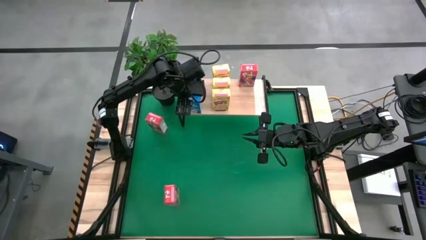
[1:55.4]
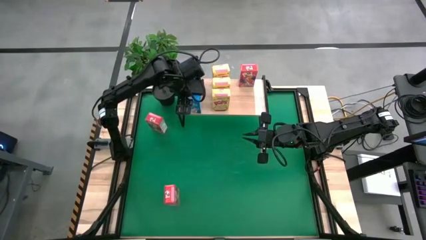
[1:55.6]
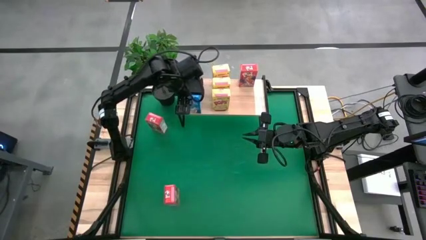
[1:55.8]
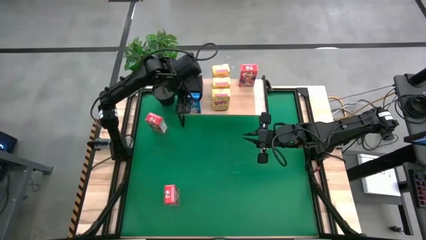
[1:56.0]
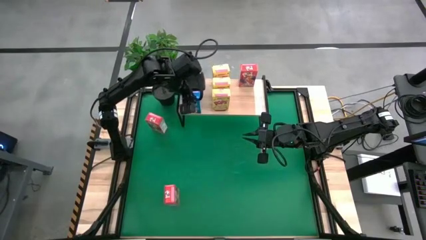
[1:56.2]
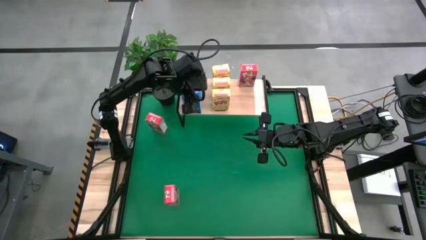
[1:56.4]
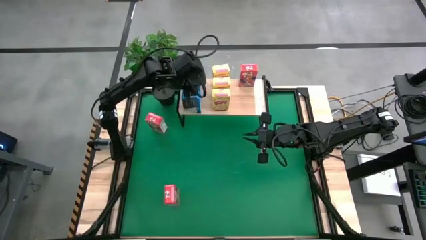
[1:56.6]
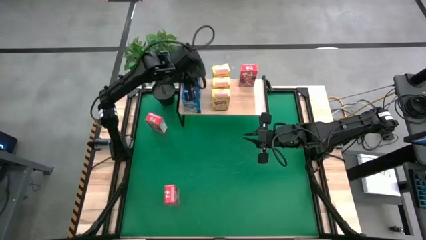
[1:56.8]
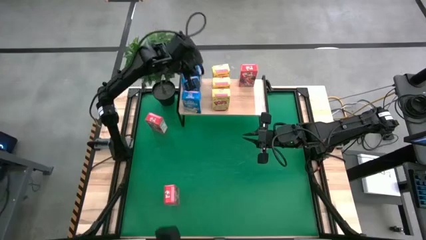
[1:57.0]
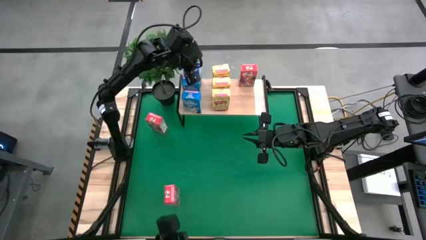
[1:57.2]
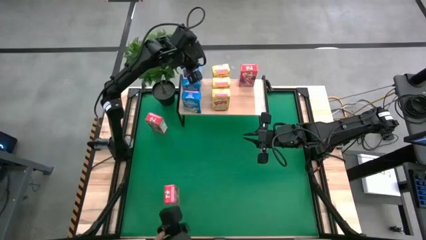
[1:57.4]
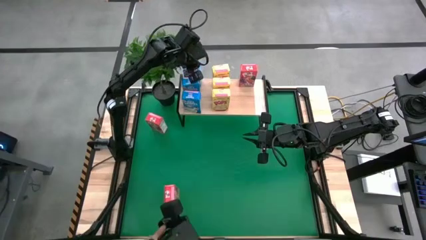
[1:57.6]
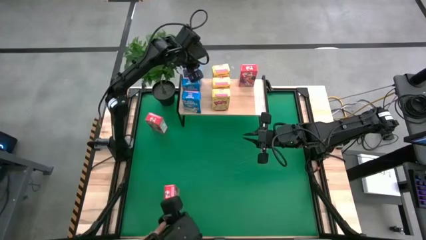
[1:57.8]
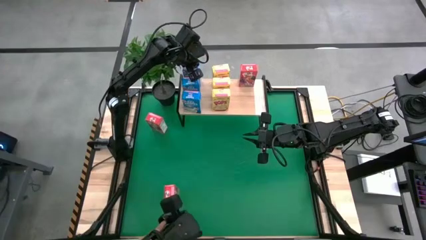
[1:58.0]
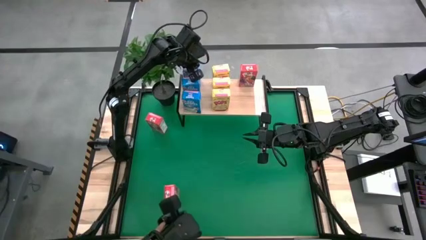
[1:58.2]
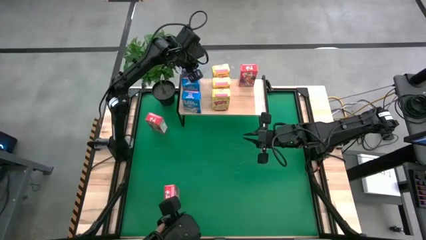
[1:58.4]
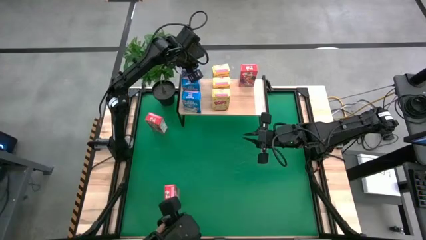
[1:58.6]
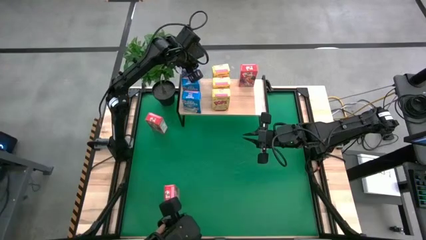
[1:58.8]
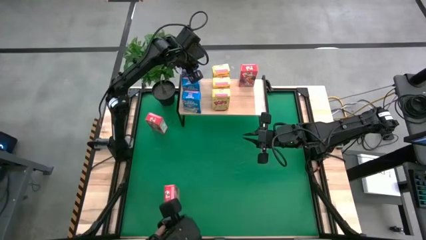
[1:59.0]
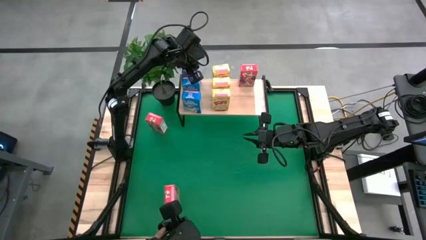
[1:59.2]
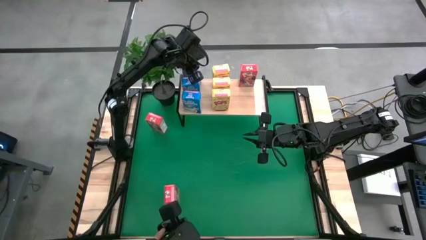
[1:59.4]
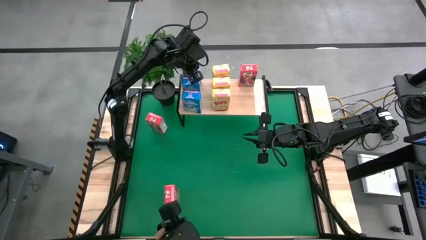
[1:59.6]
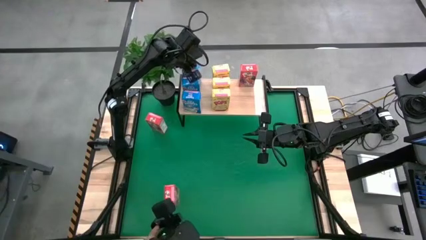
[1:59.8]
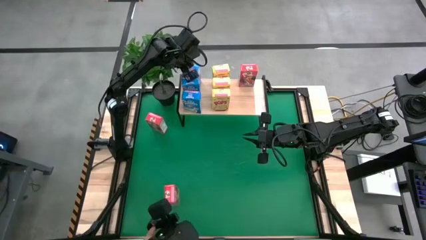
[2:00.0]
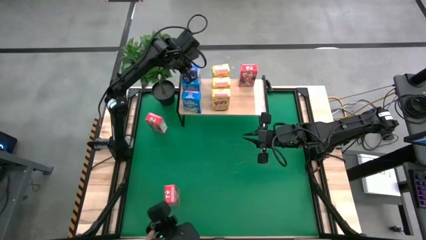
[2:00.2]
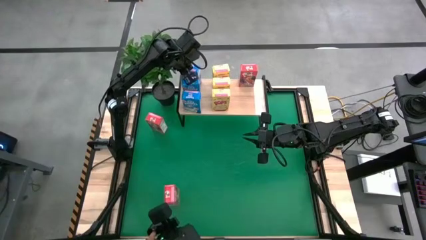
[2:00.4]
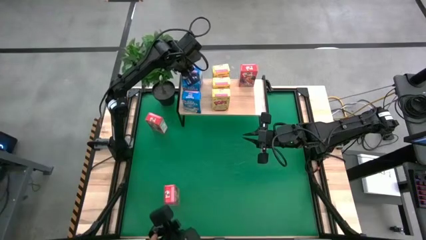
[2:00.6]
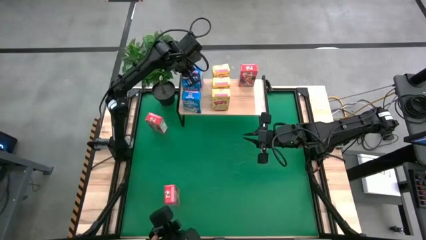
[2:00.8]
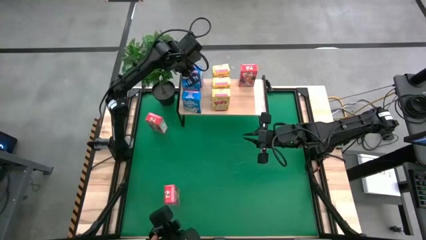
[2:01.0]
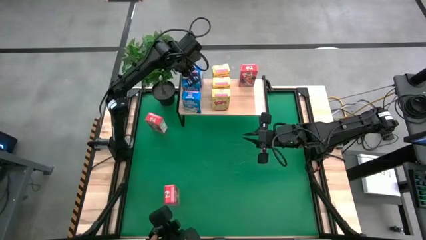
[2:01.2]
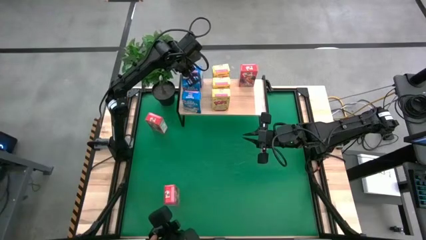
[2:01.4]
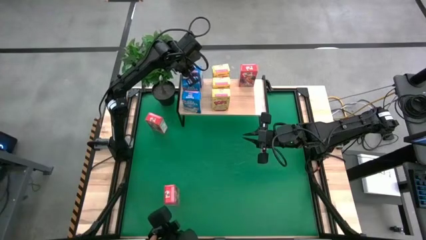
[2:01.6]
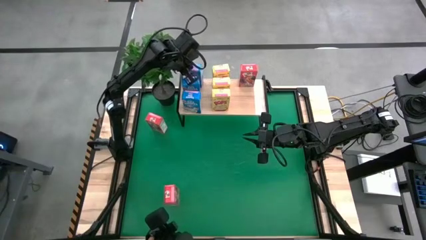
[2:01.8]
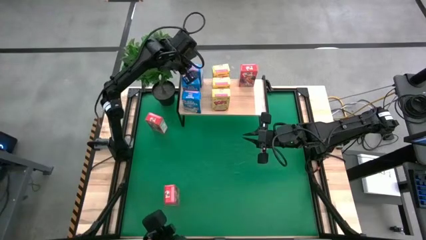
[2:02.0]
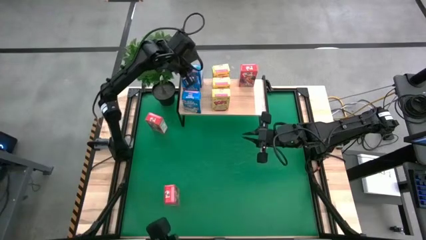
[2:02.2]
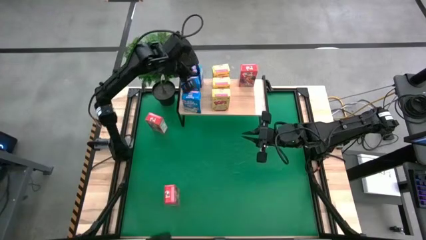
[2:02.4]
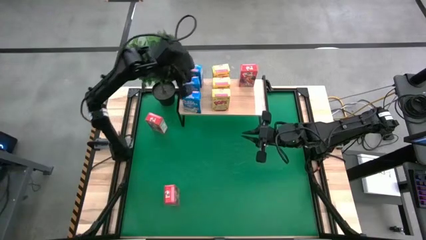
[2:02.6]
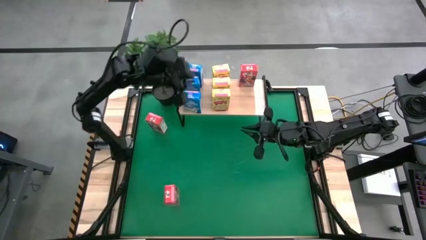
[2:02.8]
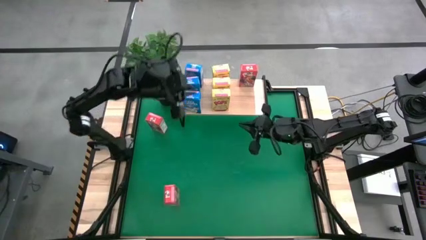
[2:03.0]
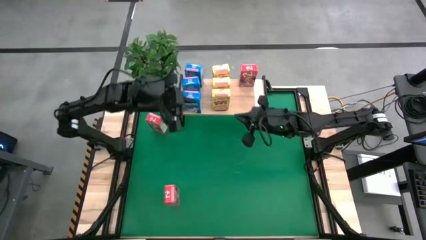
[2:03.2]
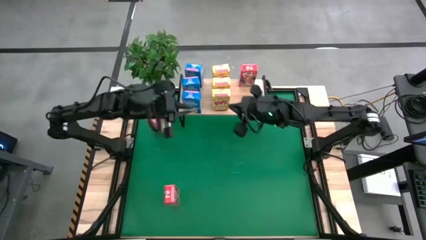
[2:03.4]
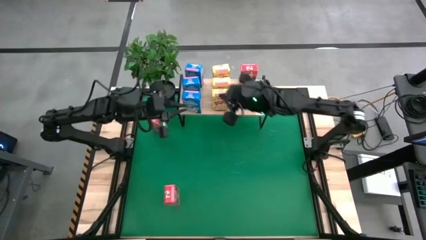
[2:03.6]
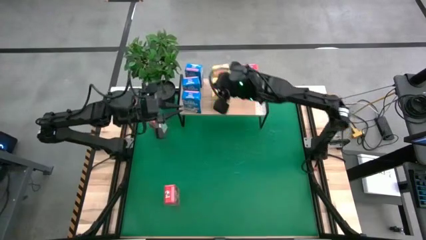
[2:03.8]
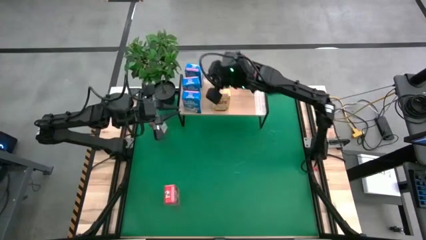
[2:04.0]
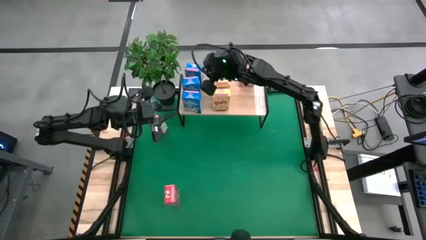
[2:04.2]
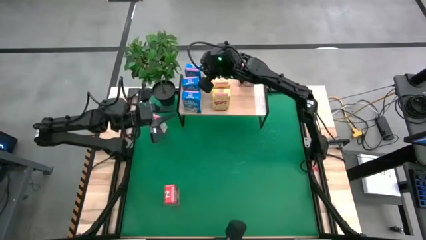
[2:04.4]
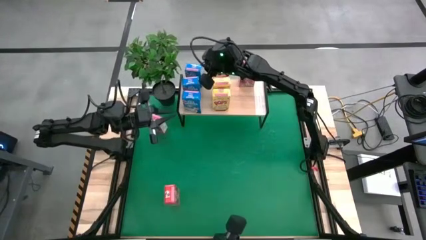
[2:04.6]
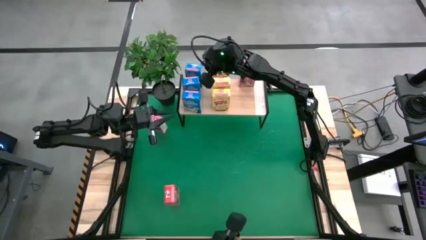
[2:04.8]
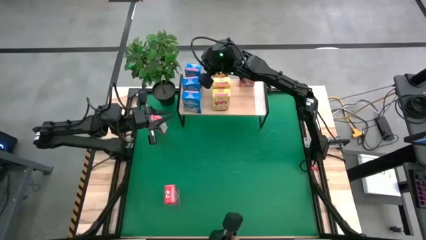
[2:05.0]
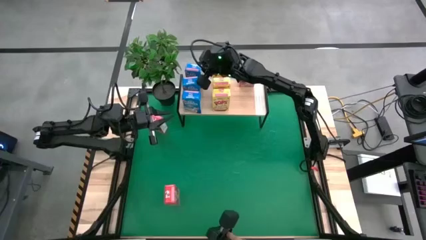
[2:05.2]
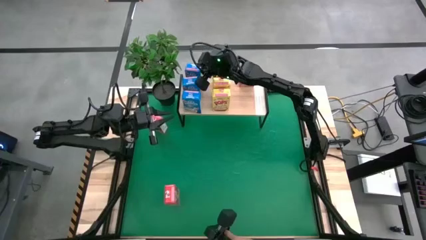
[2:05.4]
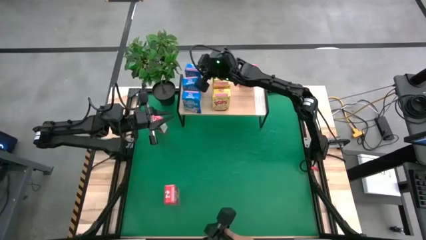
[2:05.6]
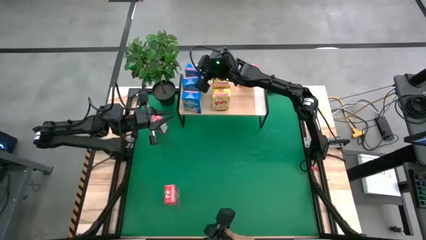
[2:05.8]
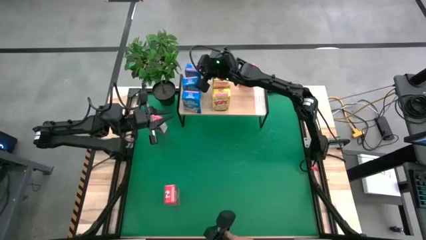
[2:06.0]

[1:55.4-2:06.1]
Task: Stack cereal on shelf
Put the blue cereal box on the shelf

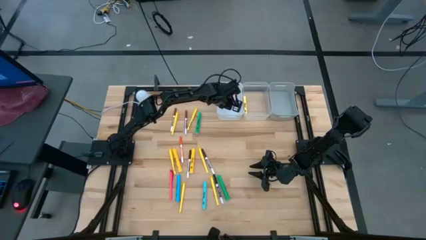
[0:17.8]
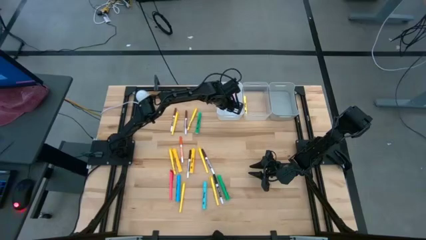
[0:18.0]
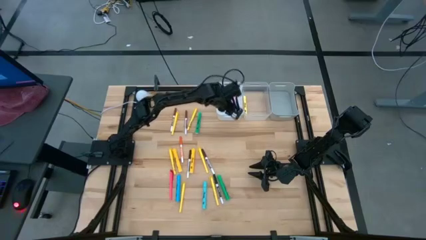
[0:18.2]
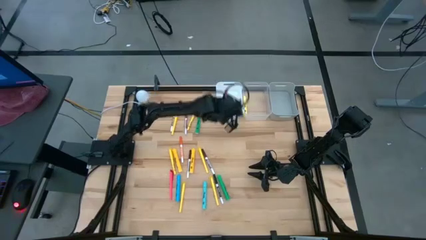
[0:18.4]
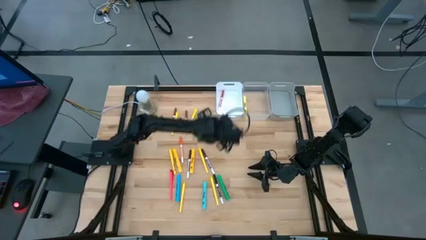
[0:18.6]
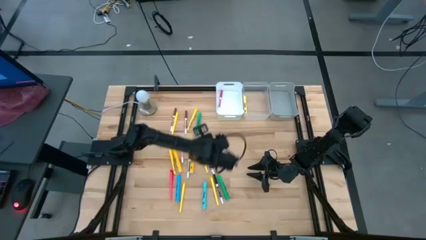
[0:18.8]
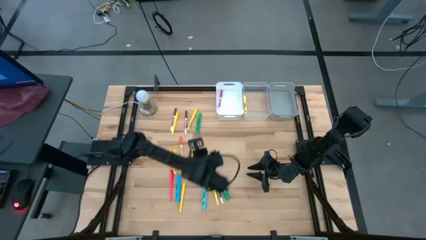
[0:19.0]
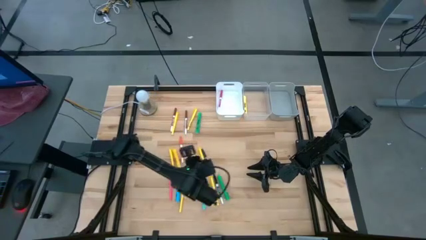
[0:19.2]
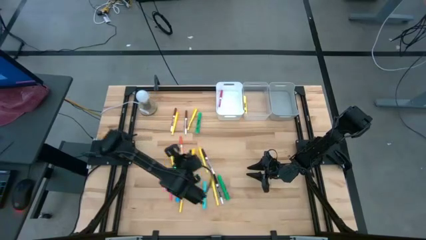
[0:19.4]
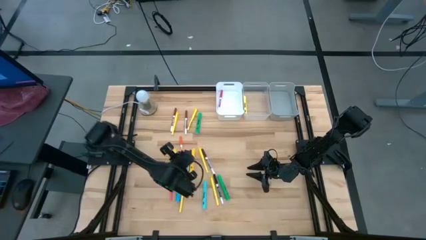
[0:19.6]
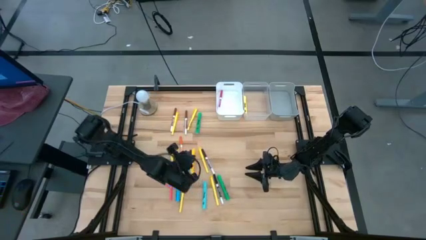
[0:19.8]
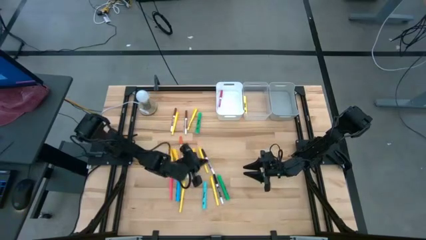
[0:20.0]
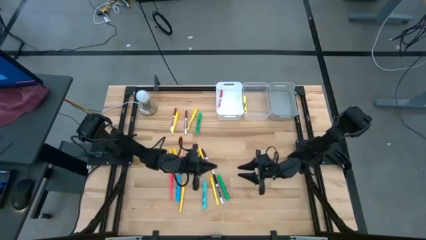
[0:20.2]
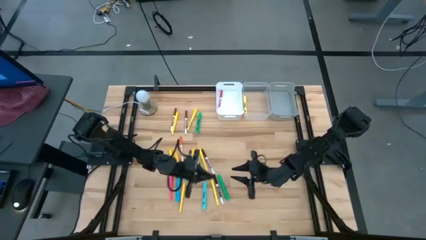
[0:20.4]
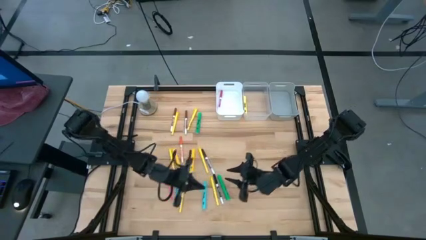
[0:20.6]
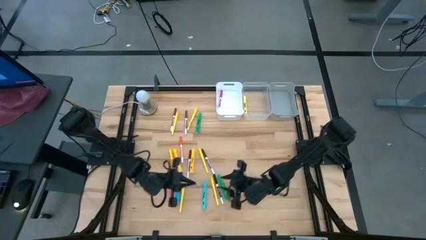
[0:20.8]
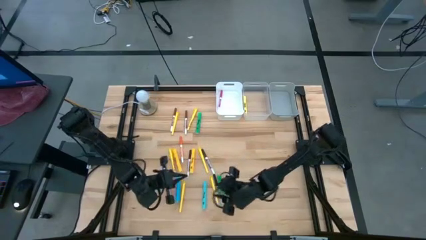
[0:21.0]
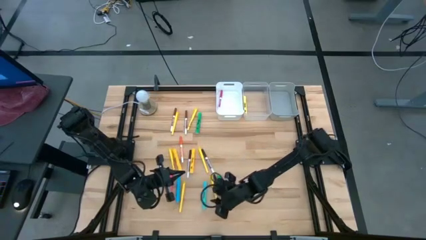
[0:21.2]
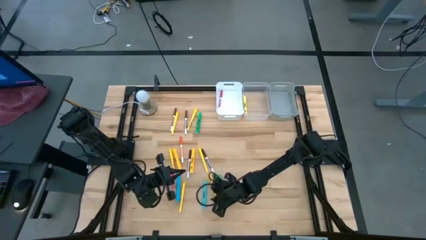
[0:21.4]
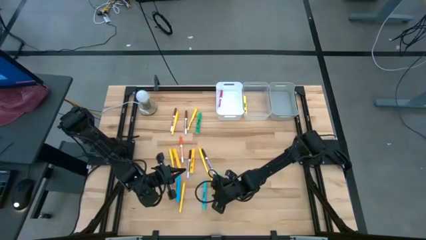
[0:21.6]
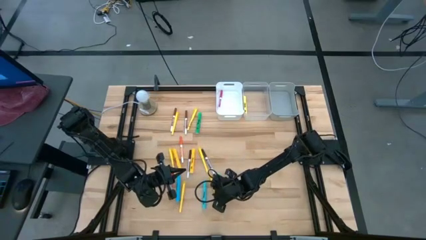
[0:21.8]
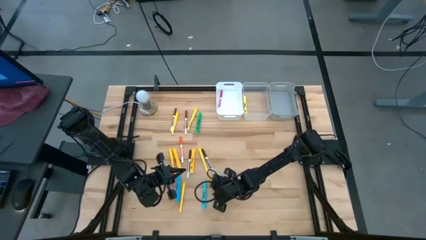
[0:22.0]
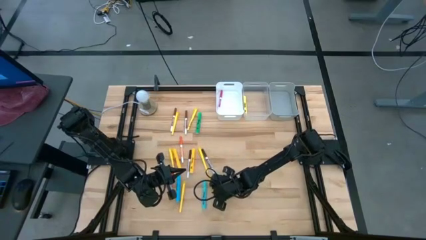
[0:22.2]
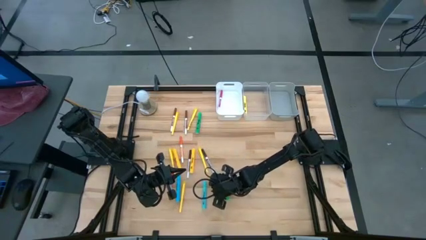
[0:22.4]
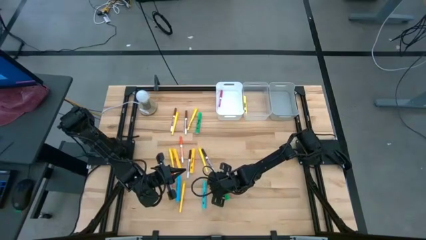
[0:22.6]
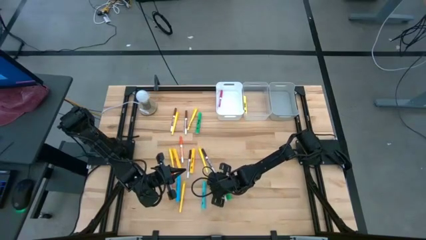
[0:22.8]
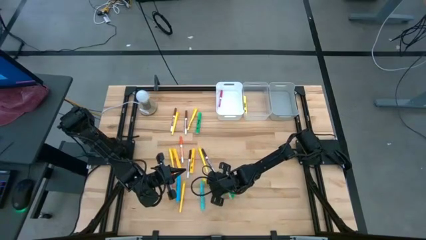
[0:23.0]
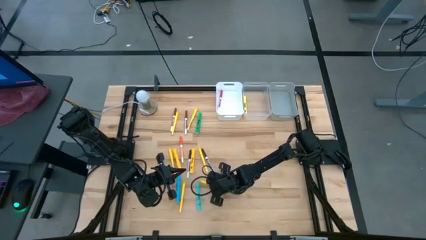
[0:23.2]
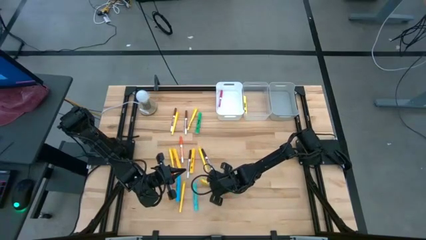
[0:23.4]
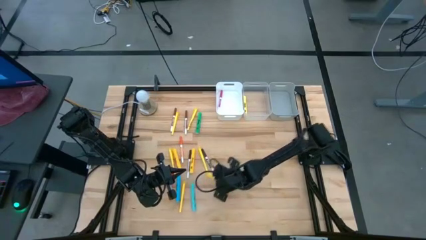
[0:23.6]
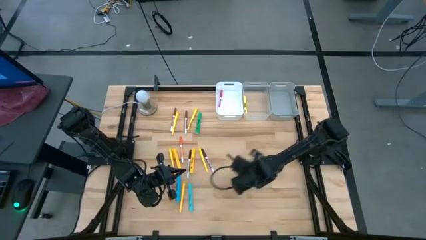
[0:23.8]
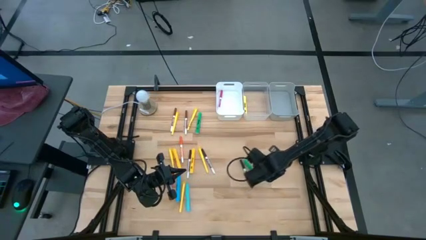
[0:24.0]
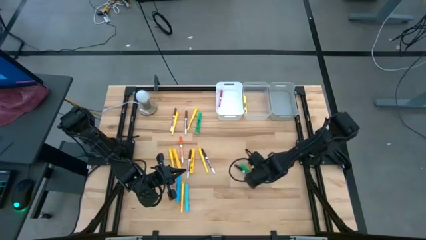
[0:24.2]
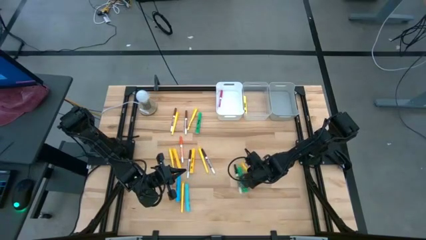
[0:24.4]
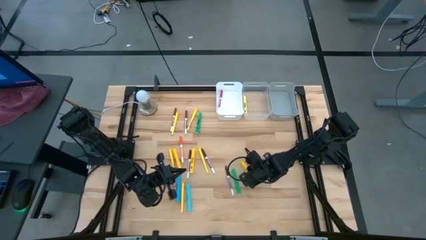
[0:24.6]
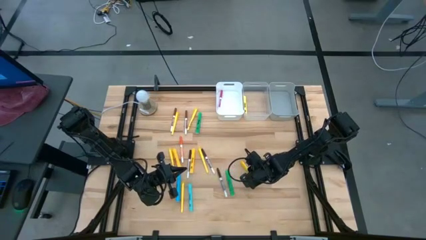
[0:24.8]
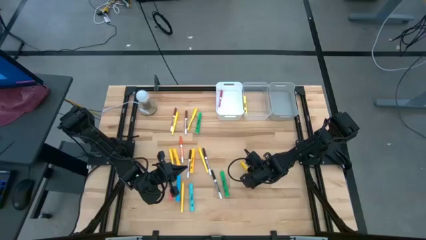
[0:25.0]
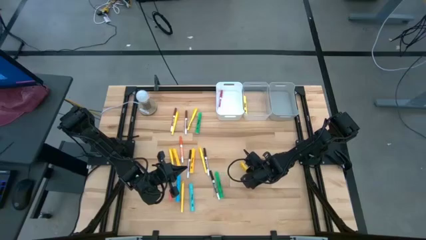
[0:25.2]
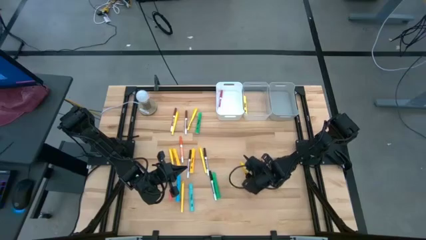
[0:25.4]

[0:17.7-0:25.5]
Task: Pick & Place Markers
Put the yellow pen into the gray bin
